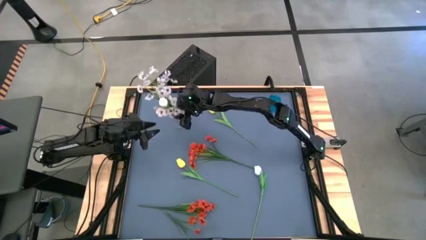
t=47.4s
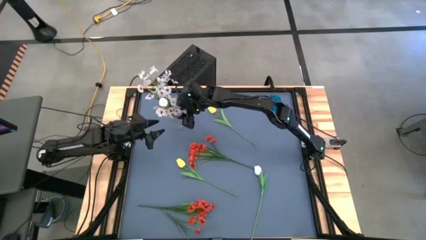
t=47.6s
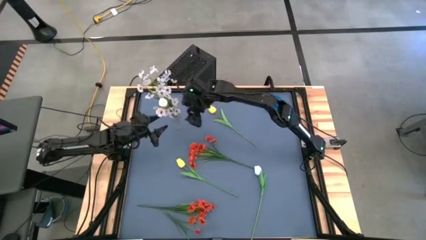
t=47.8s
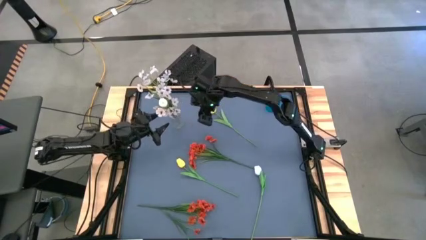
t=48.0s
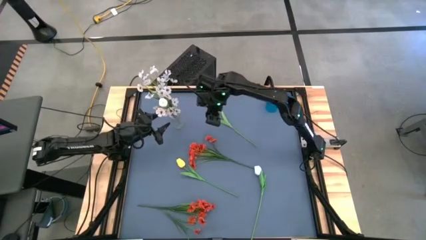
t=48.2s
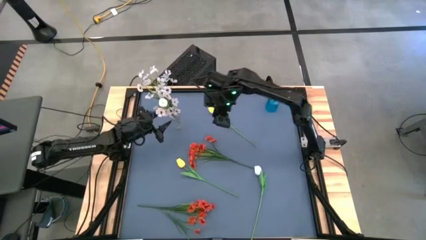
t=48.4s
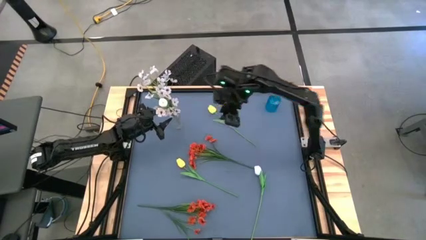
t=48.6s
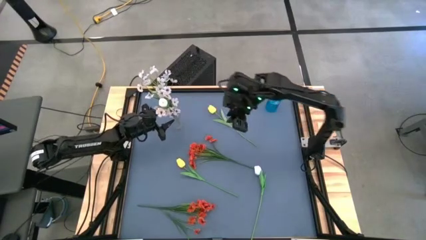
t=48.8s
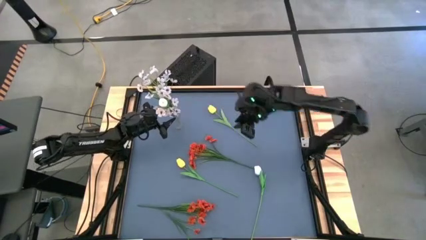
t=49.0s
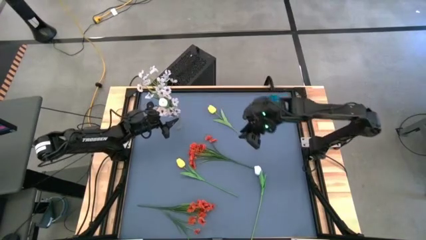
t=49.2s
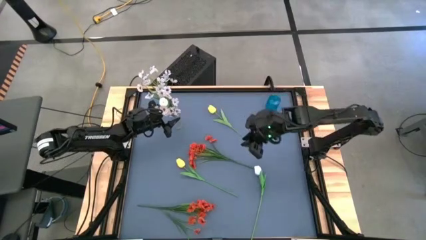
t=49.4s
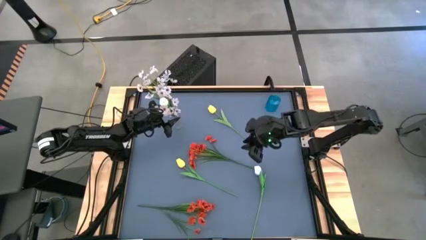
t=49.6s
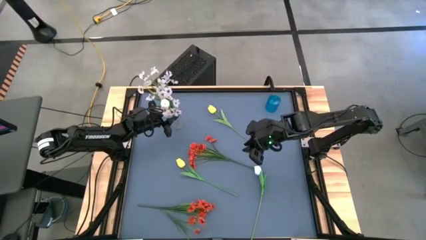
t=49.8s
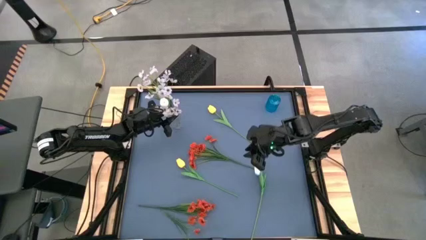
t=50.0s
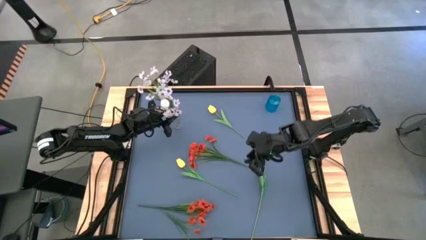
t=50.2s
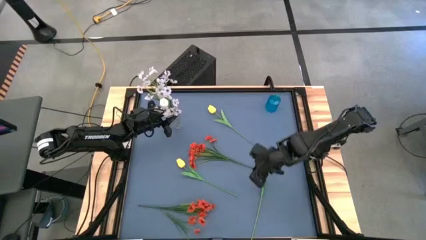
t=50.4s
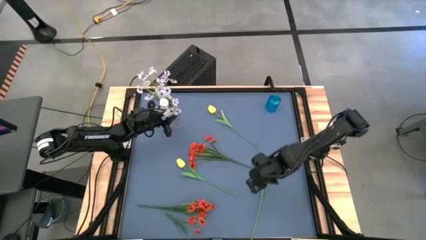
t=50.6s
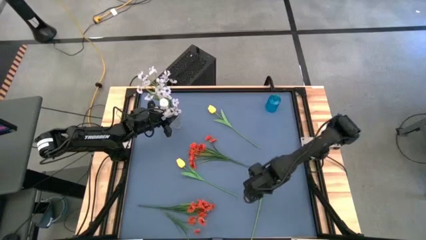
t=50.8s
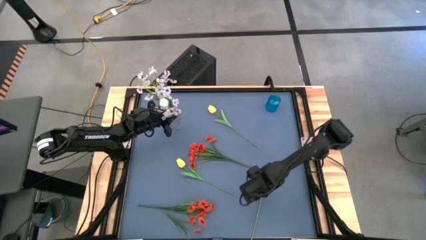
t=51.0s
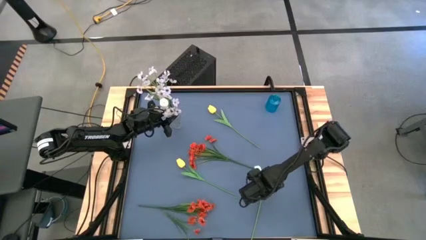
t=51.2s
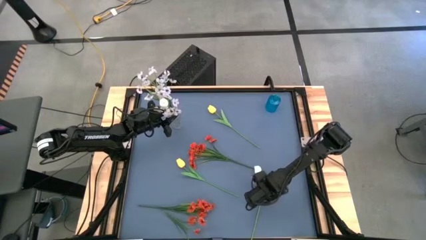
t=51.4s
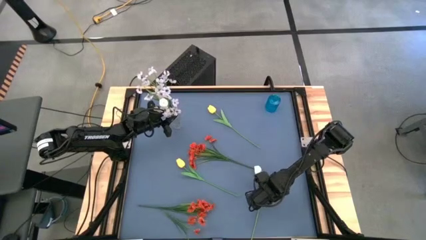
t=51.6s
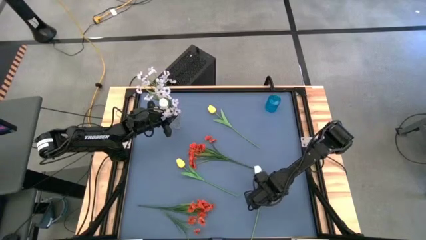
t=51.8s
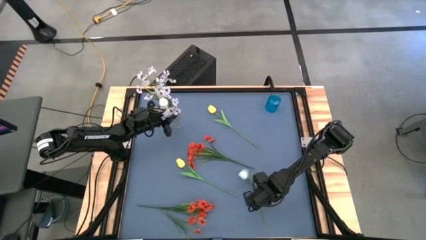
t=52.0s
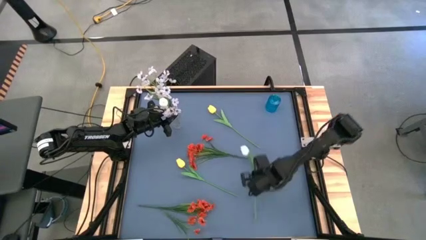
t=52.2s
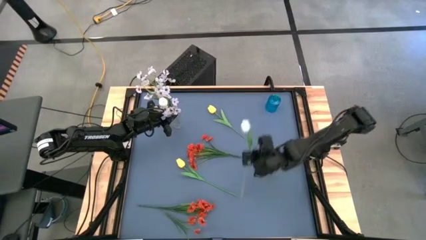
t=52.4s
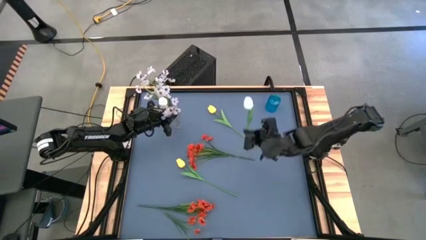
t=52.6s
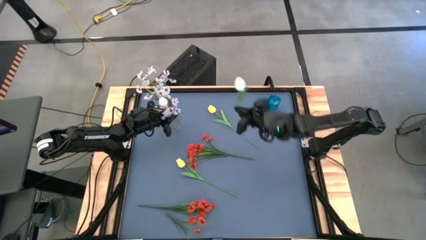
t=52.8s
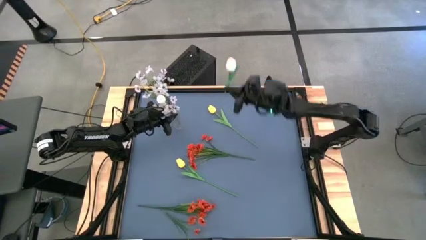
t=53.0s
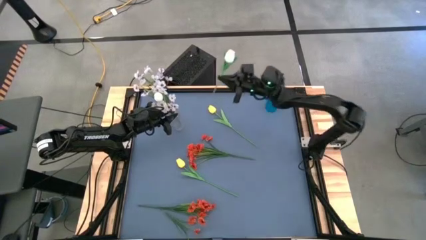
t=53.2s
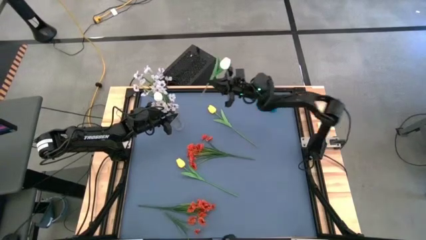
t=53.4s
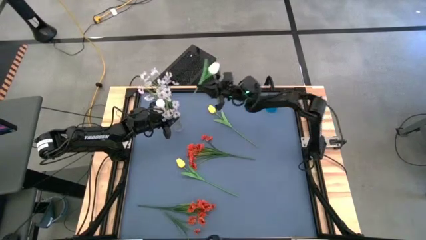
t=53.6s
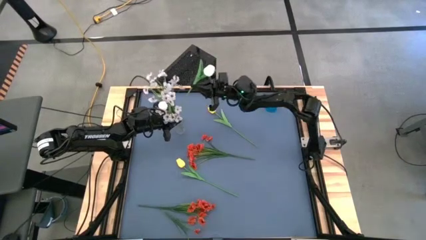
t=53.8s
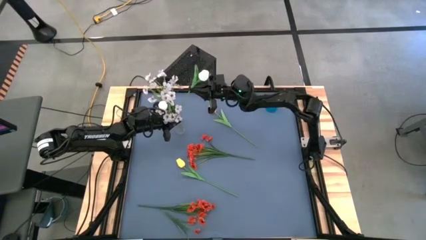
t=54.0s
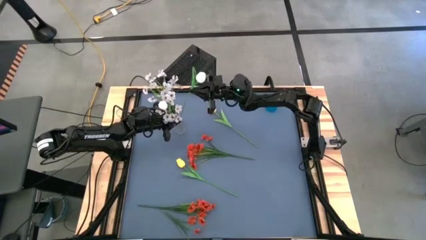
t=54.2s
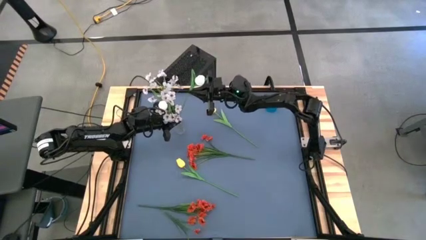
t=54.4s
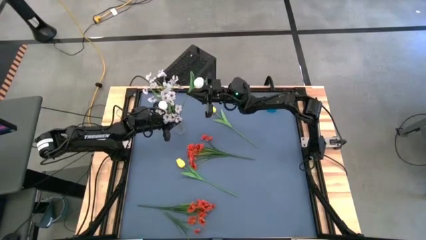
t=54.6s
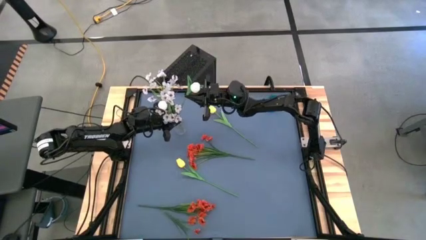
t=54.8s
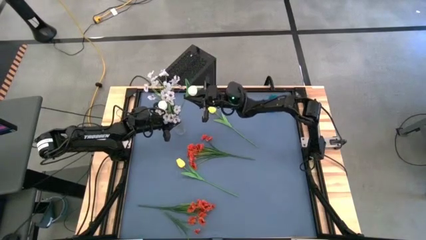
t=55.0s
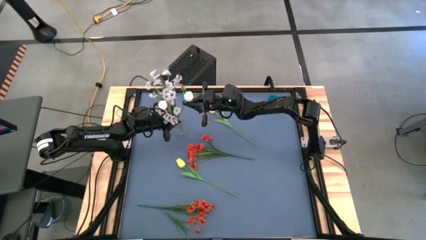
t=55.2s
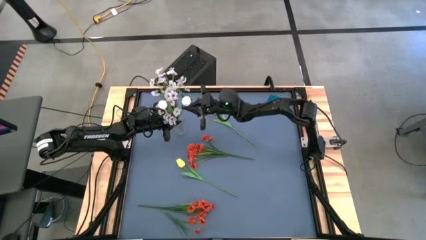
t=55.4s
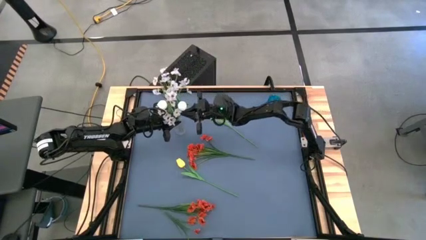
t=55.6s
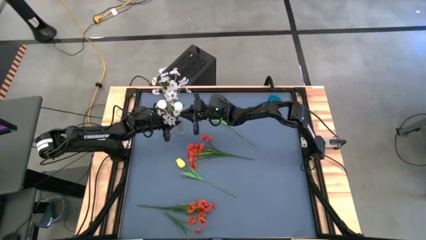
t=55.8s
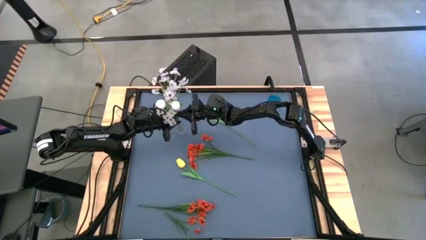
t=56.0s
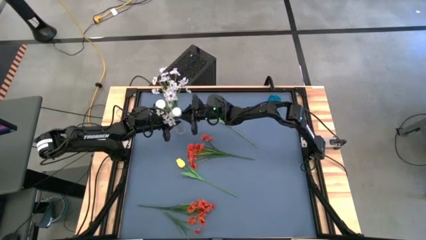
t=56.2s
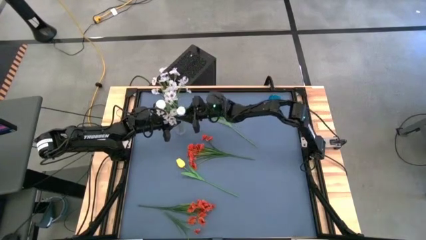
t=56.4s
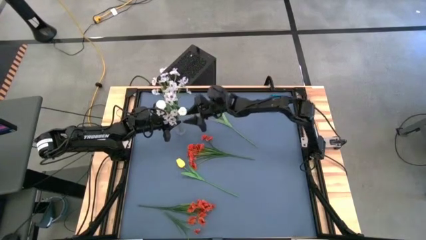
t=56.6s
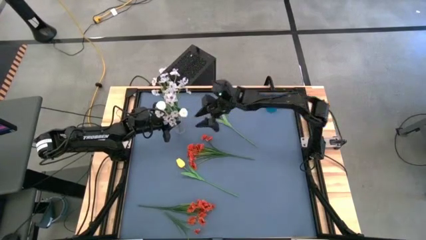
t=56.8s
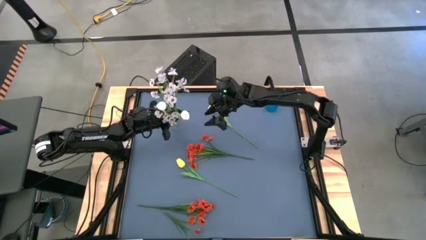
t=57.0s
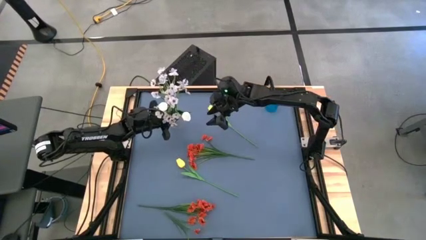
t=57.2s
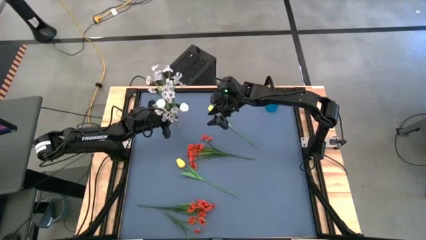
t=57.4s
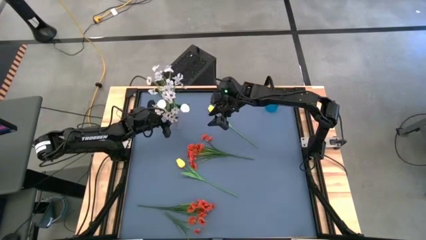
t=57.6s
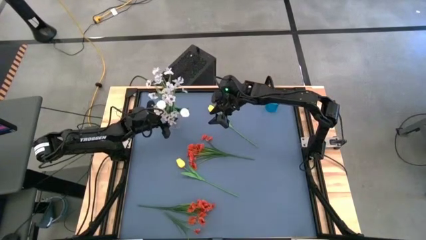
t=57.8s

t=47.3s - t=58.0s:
Task: Sort flowers into vase by color
Put the white tulip flower into the transparent vase

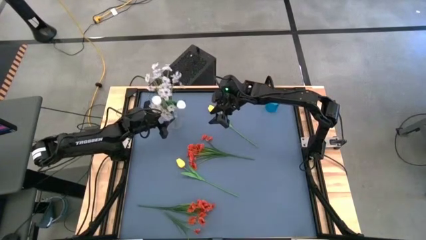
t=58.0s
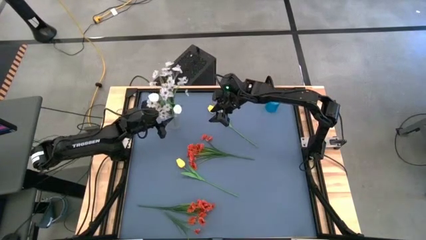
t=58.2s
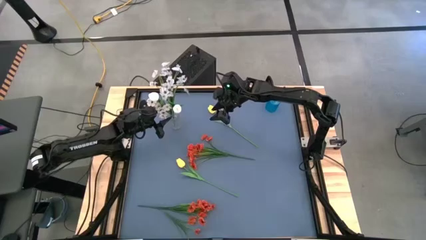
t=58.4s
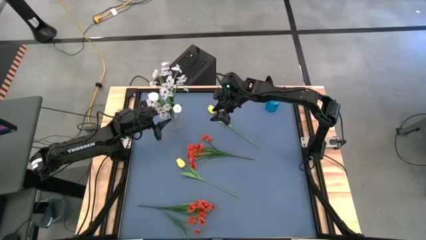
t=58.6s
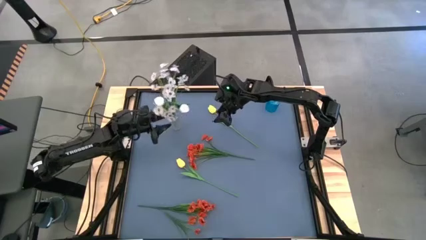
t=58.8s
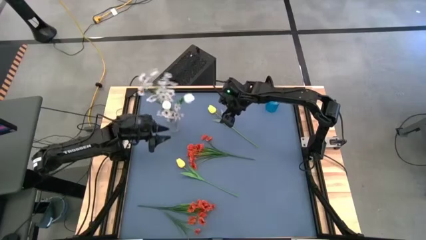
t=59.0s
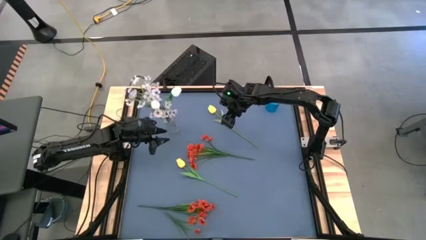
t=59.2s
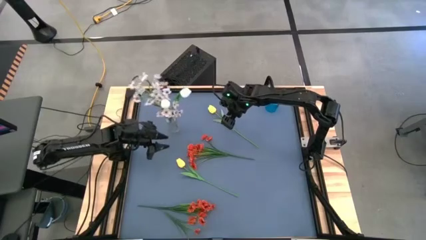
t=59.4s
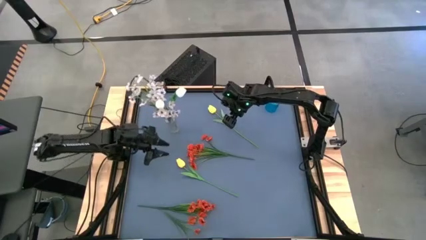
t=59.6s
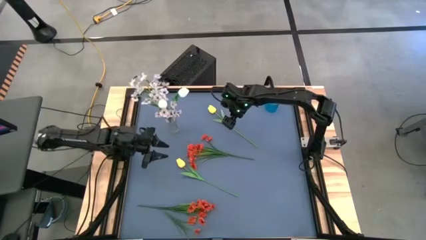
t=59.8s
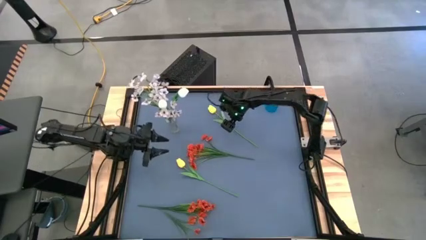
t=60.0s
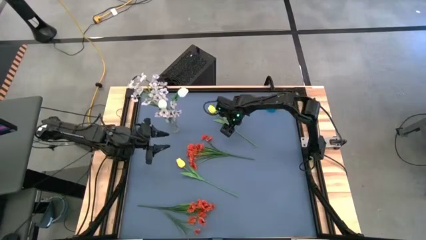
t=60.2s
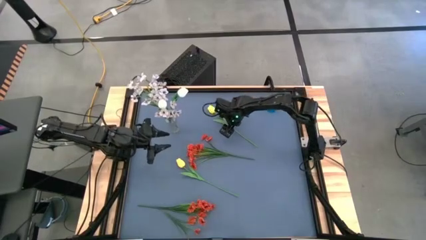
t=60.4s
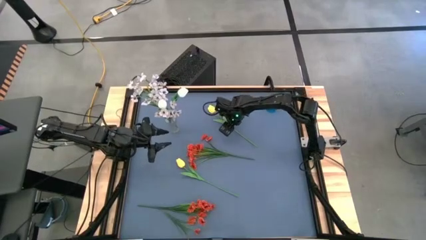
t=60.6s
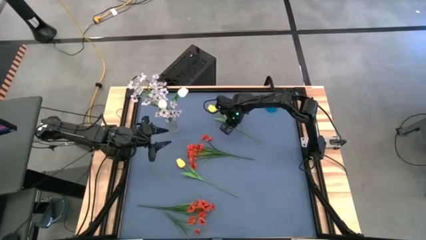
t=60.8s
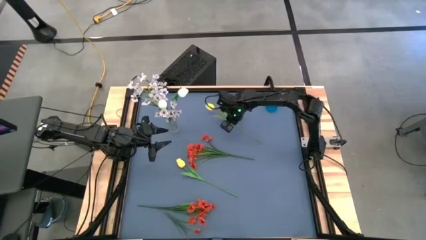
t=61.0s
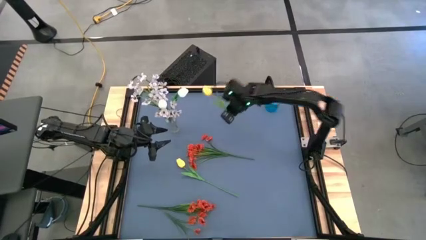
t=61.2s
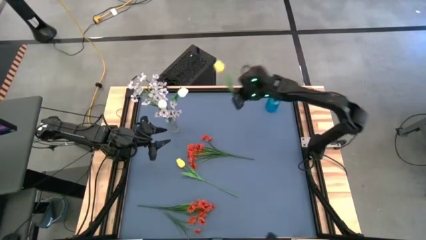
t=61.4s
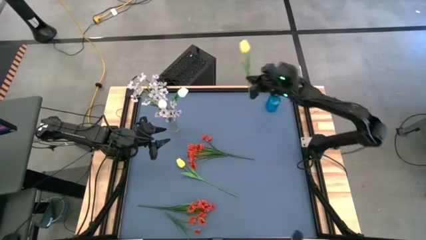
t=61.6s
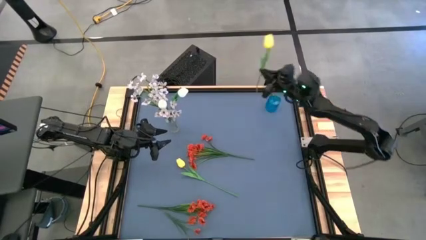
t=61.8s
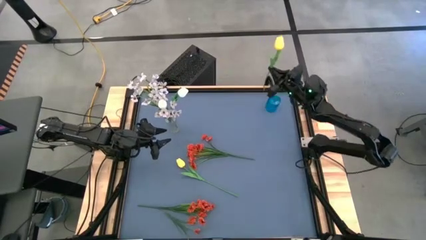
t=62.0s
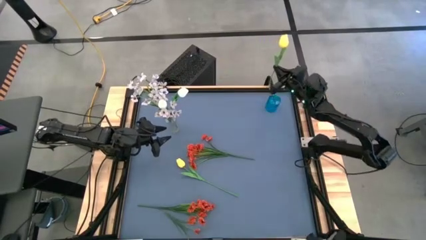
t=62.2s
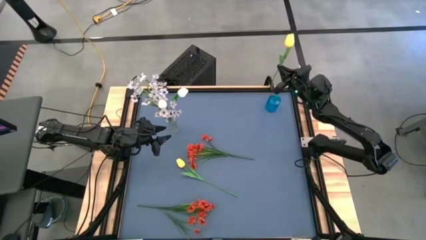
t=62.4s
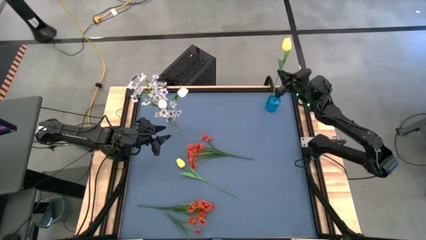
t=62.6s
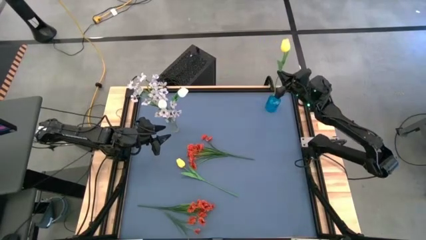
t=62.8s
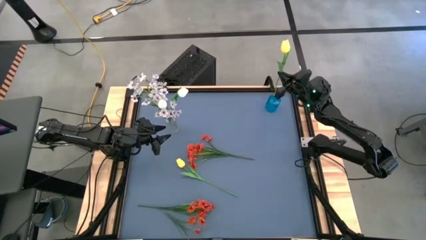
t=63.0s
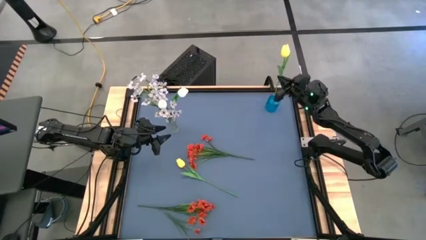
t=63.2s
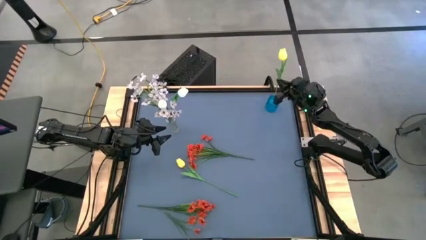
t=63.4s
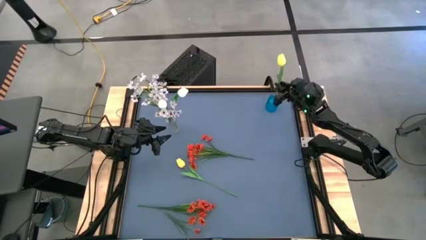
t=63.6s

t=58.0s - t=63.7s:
Put the top yellow tulip flower into the blue vase

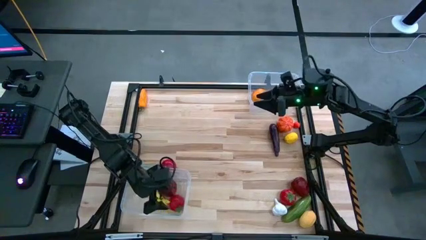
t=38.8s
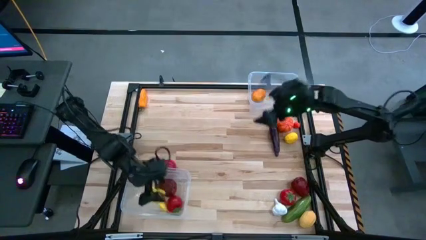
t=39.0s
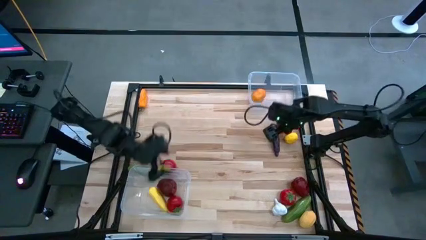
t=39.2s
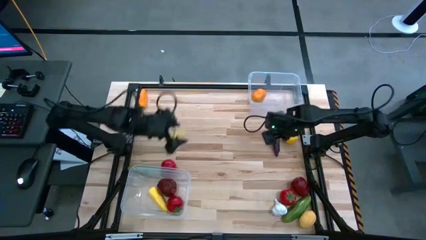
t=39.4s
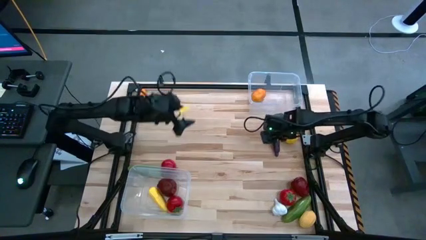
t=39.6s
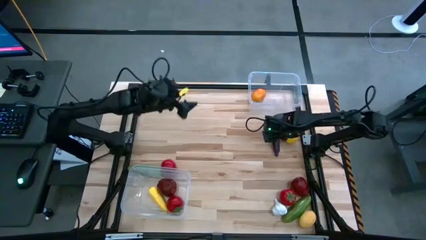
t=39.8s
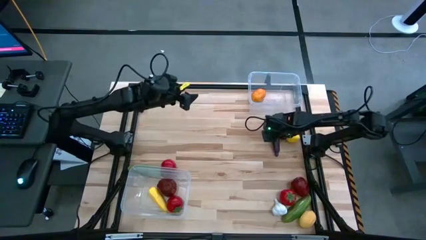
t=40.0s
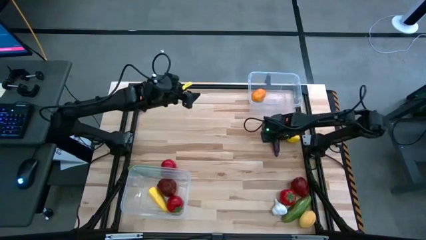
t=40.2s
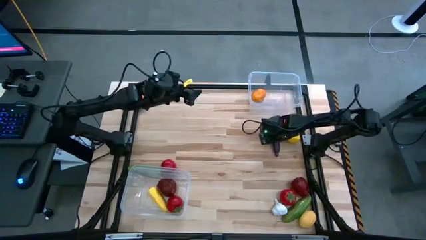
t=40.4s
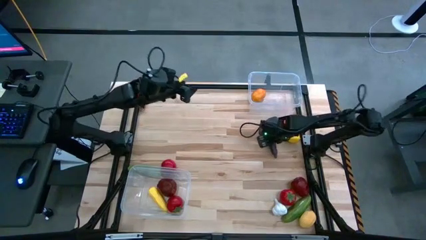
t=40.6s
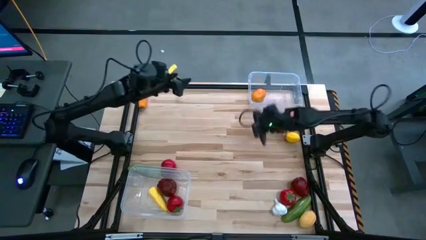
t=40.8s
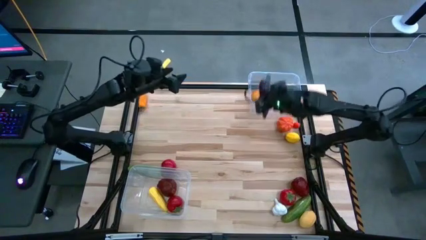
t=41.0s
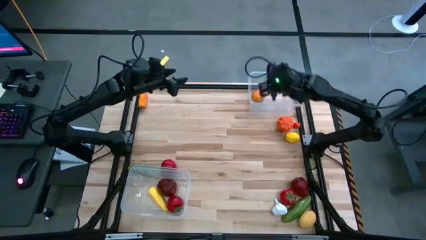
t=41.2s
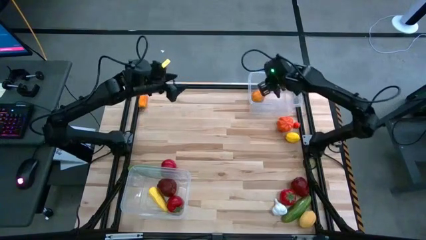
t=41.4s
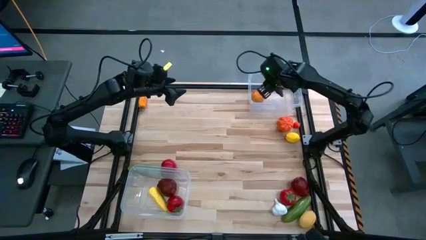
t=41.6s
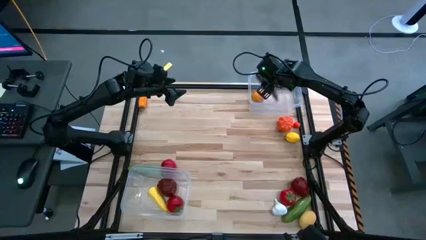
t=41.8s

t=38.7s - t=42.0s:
Task: Sort produce into baskets
Put the purple eggplant into the top transparent bin
